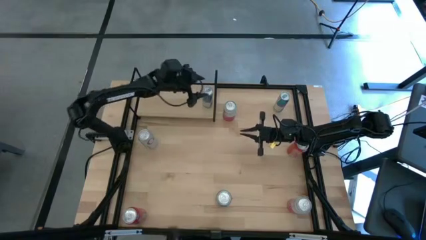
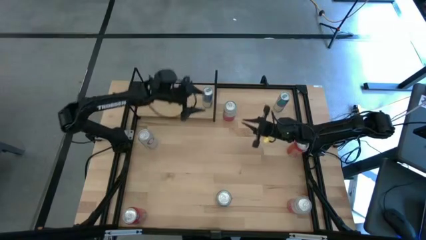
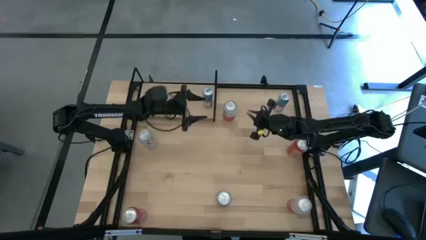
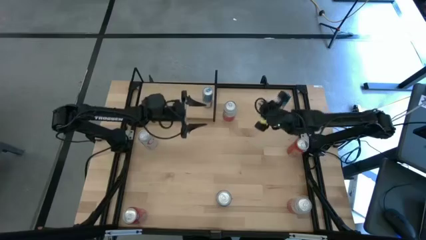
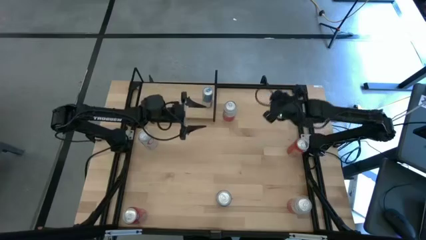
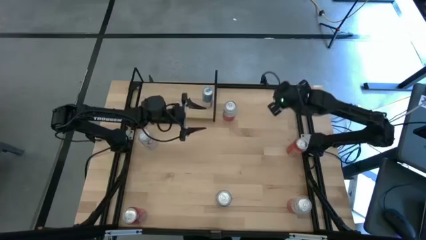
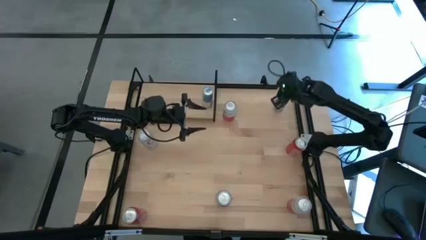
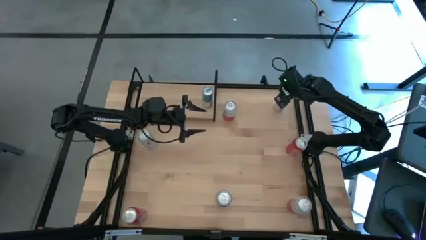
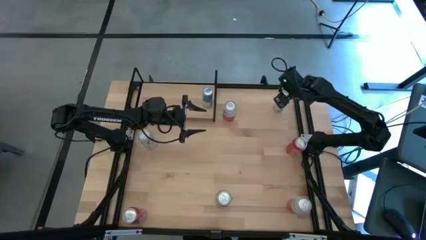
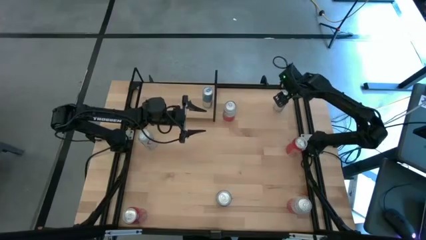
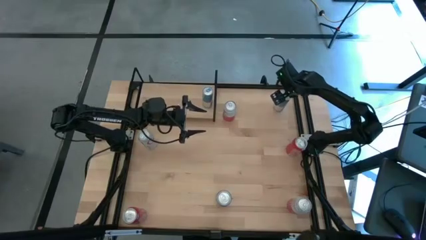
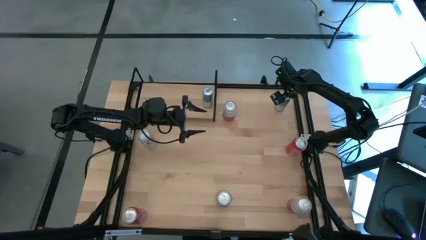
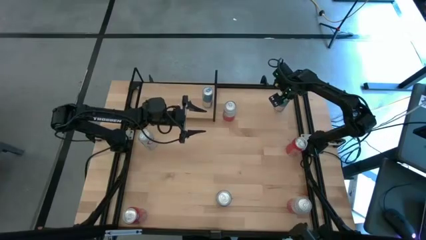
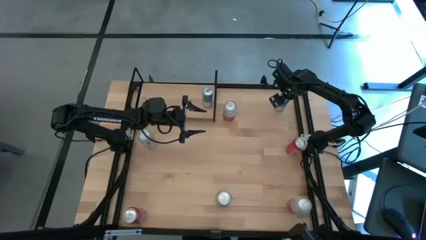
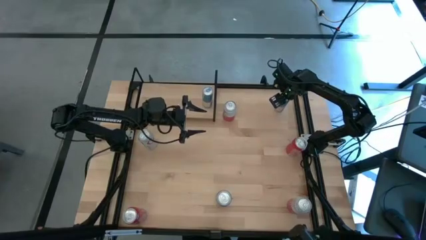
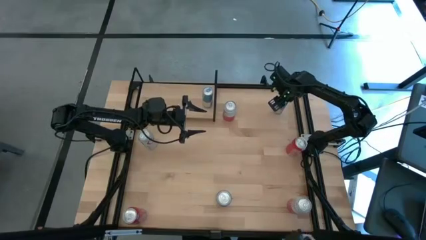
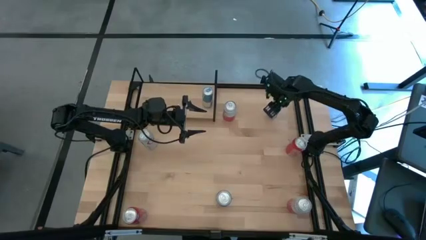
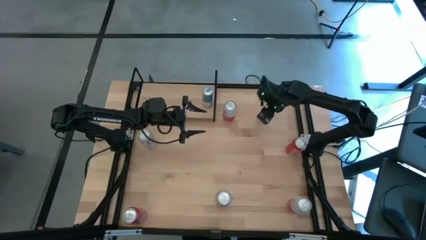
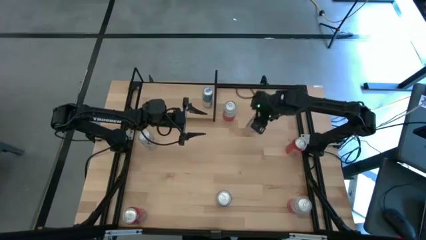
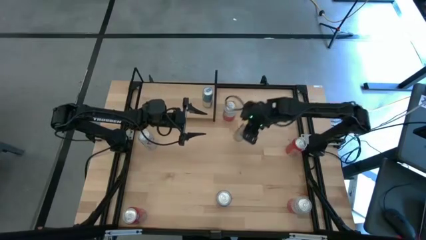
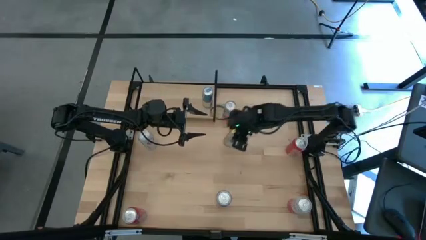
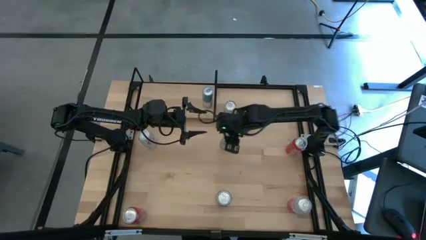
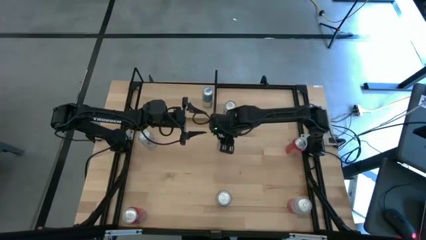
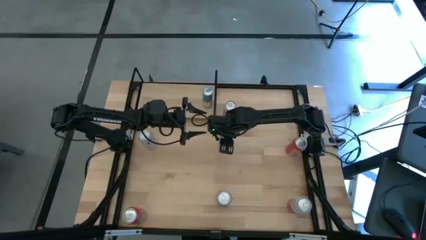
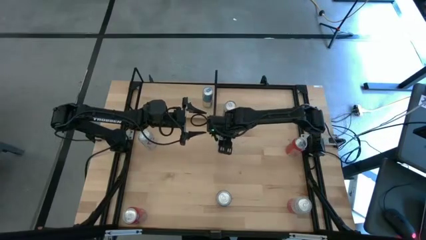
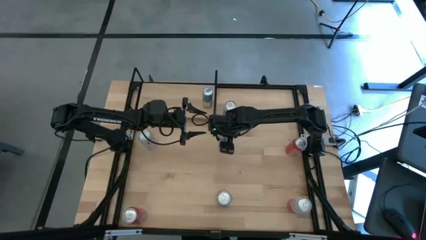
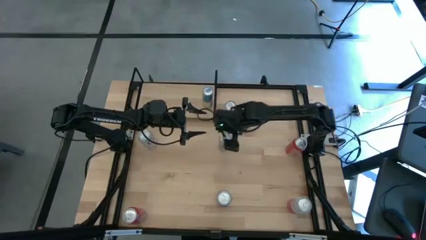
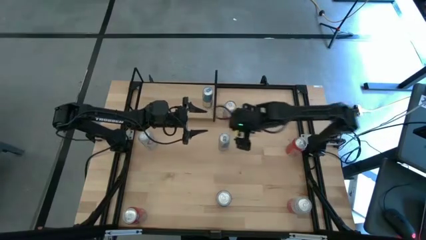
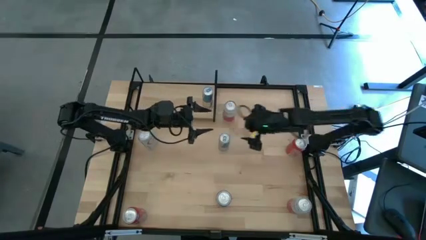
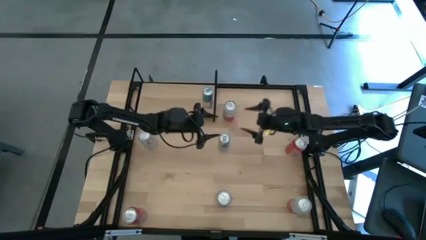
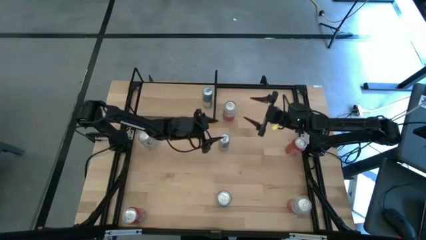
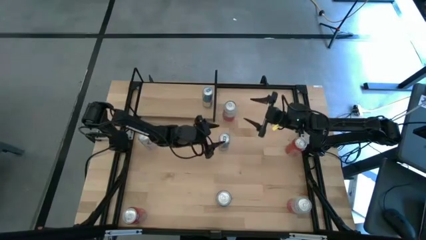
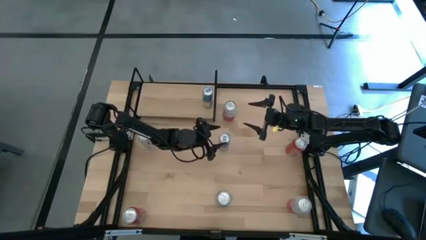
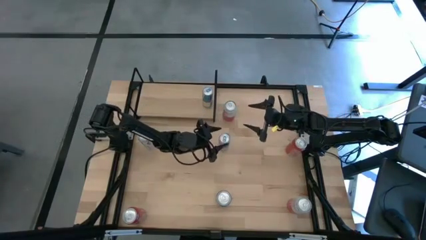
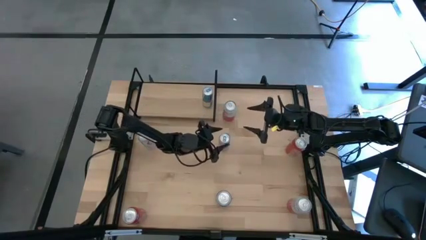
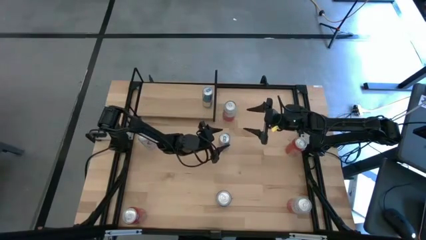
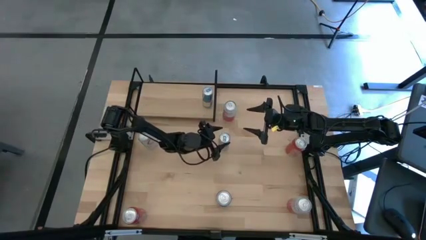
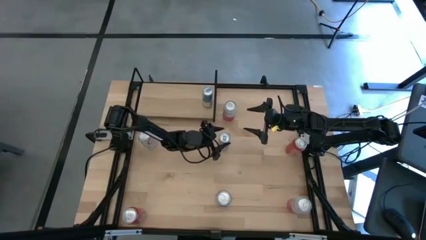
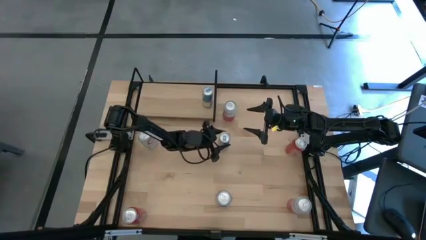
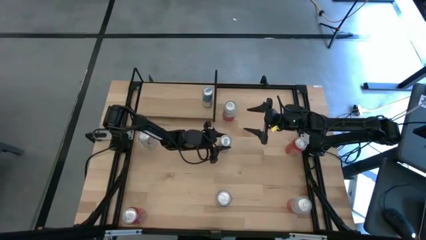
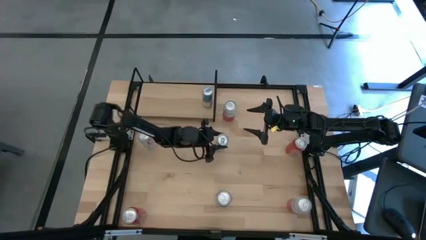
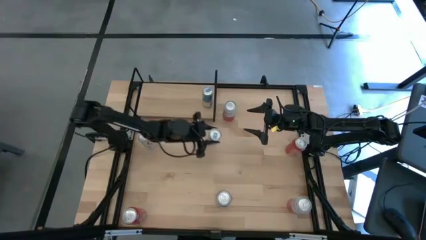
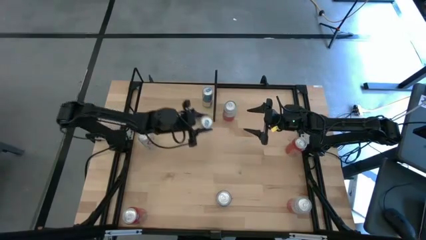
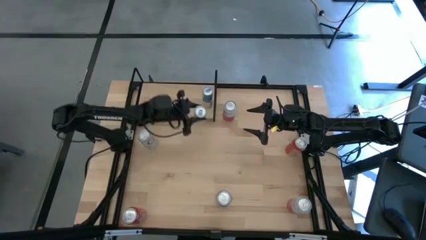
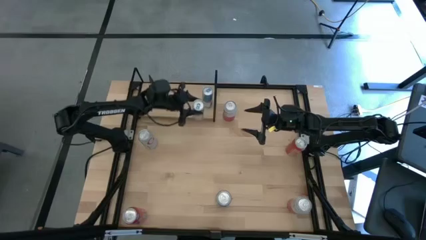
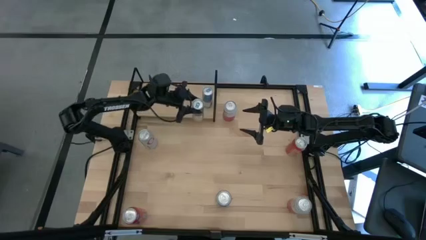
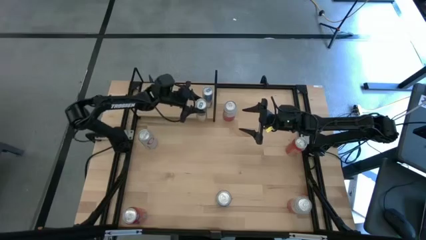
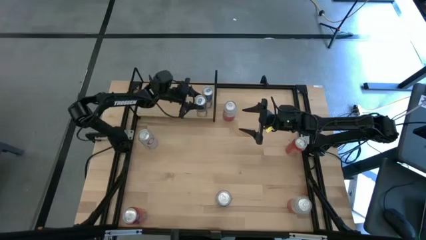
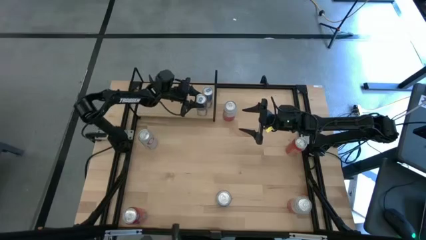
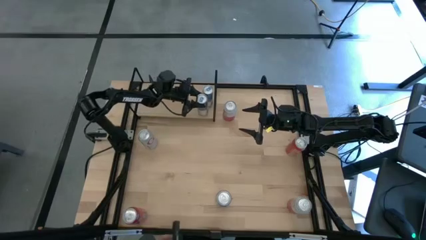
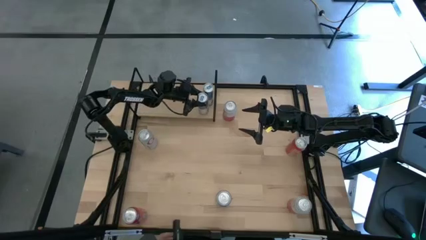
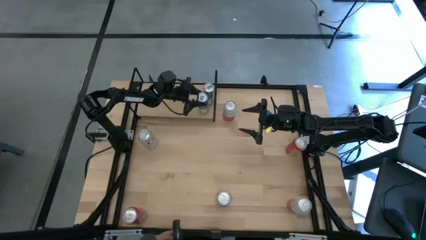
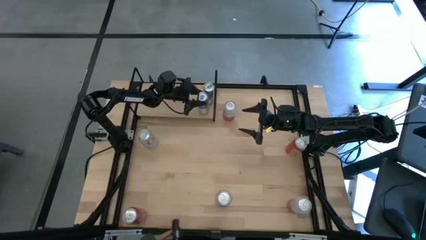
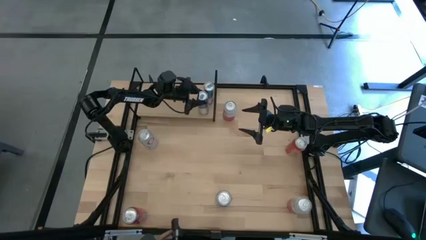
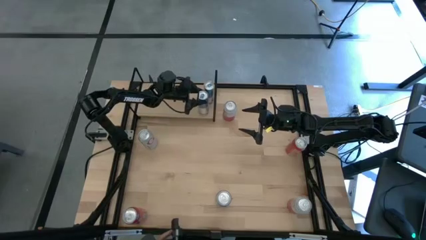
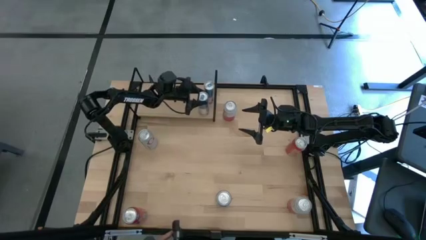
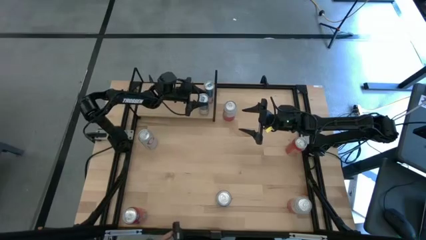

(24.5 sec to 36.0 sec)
Task: Place canned beverage on shelf
Put the blue soda can on the shelf aligned with the other blue soda can
